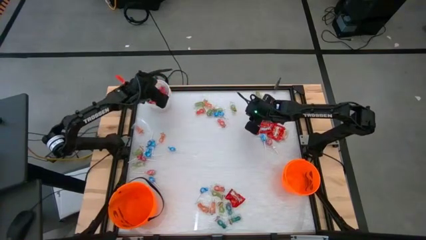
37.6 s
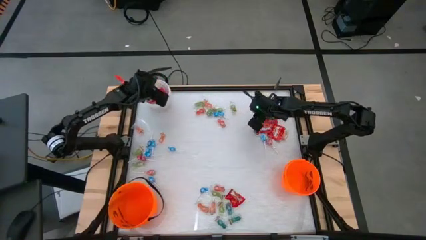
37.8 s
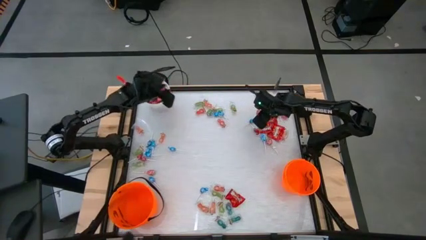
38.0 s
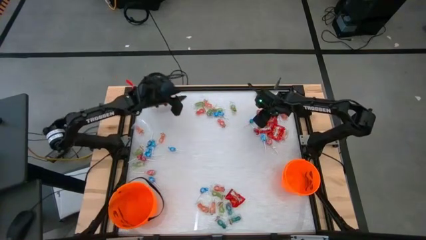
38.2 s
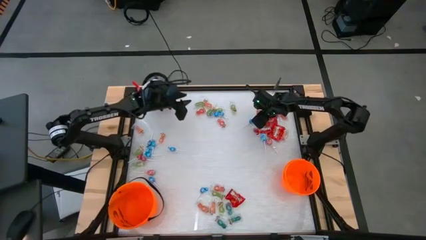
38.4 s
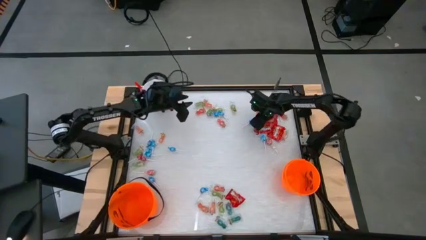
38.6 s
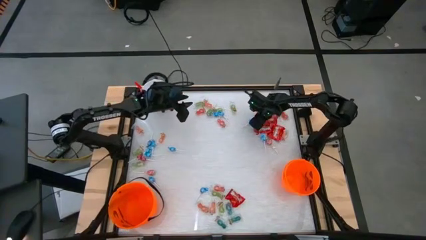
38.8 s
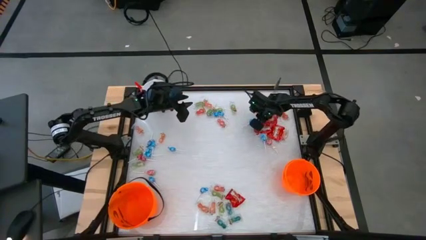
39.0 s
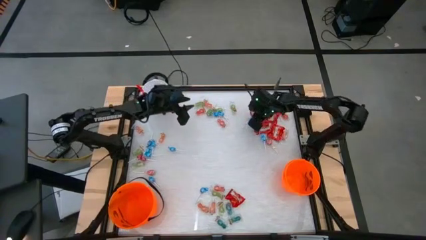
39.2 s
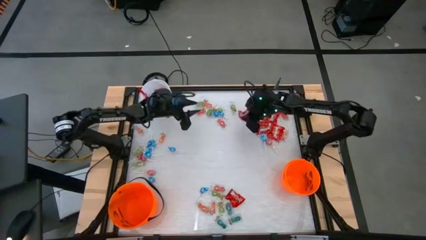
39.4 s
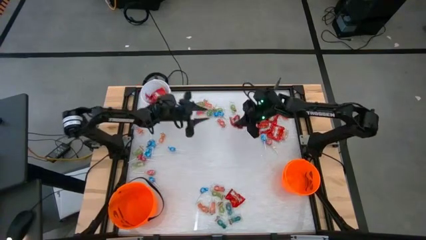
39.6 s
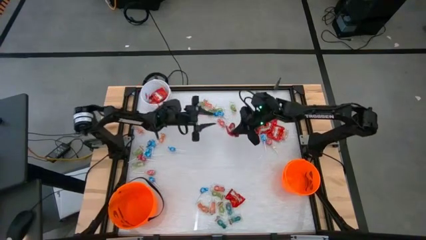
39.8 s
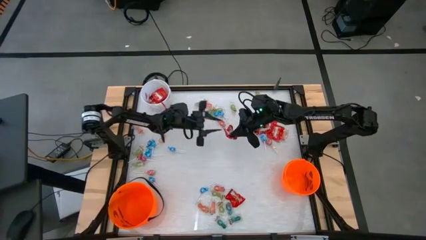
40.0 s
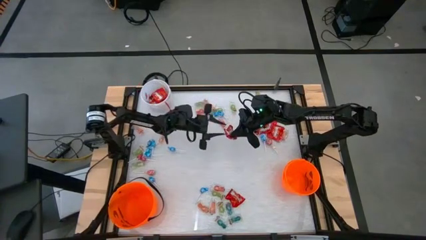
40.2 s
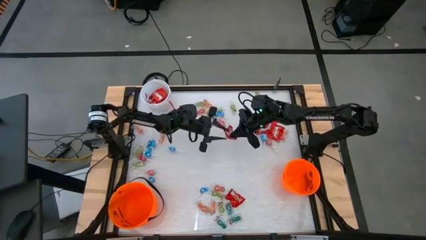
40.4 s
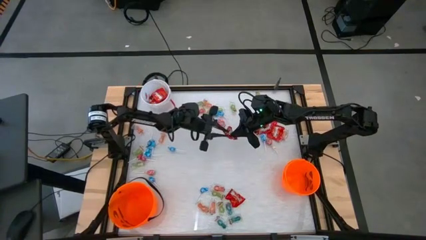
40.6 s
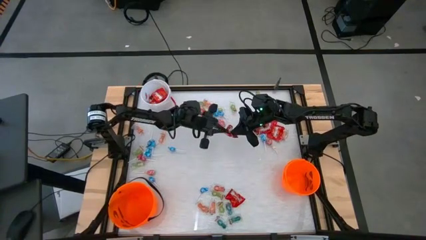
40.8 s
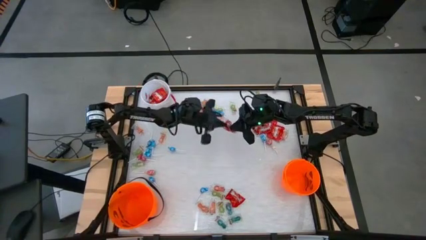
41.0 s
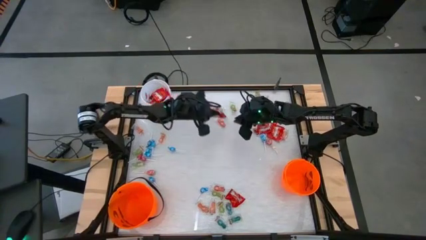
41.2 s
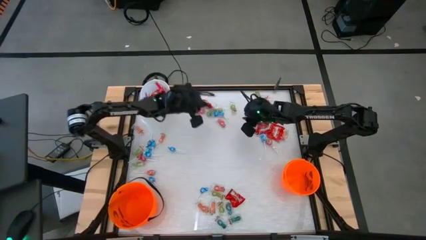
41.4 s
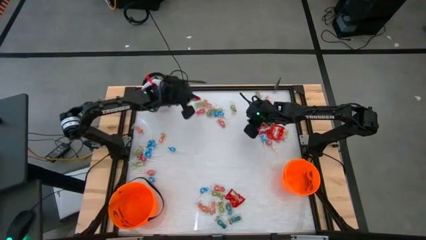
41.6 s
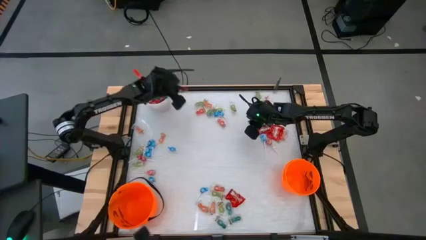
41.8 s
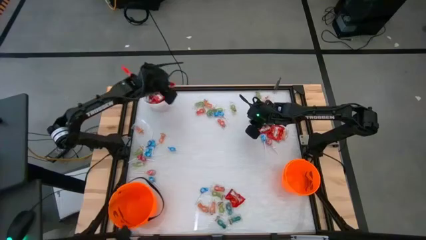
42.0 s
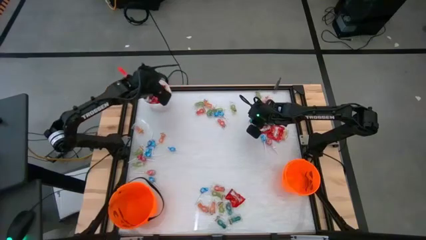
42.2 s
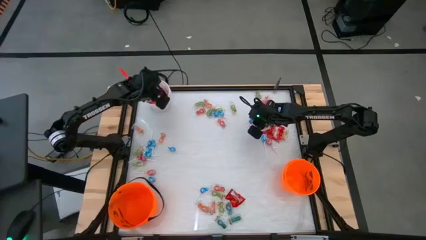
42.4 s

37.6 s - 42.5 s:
Task: Sort candy by brand, put in halloween buckets
Put the skittles into the white bucket

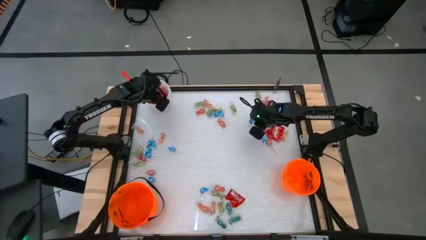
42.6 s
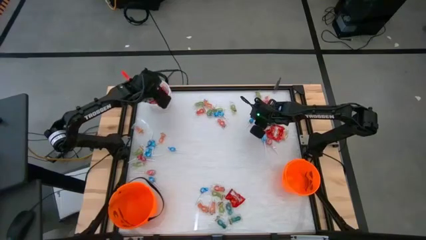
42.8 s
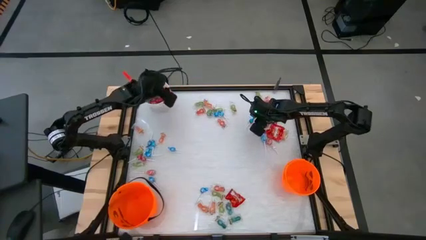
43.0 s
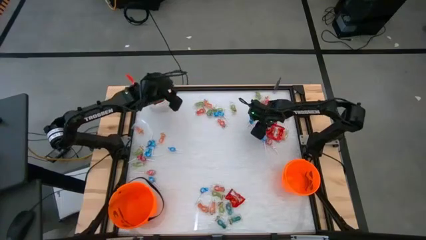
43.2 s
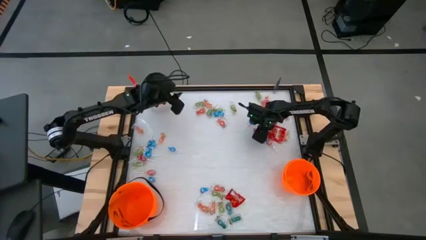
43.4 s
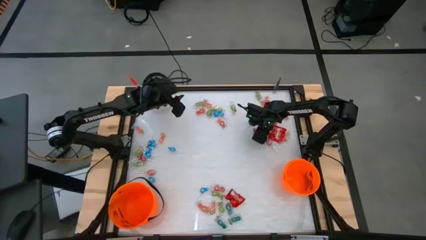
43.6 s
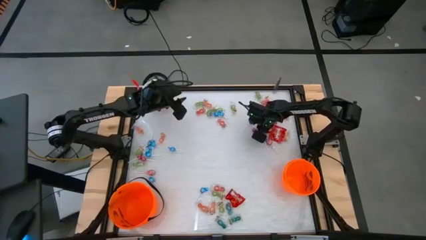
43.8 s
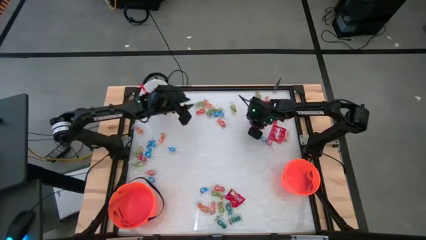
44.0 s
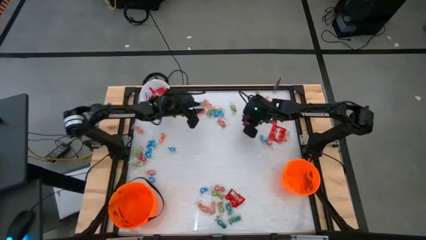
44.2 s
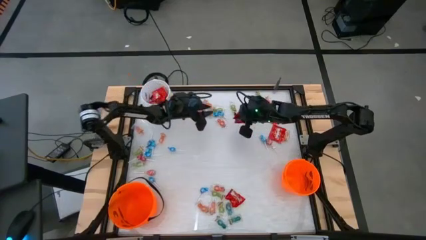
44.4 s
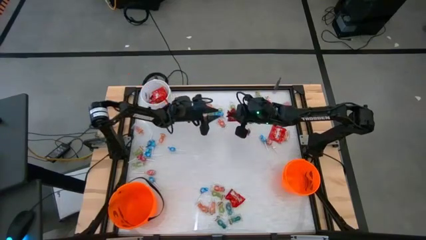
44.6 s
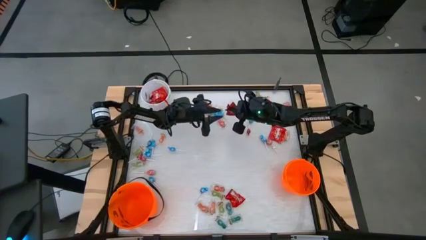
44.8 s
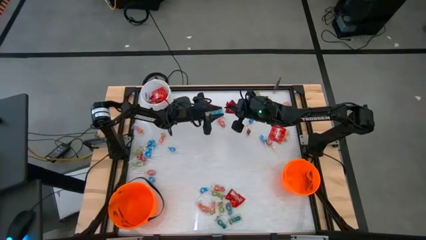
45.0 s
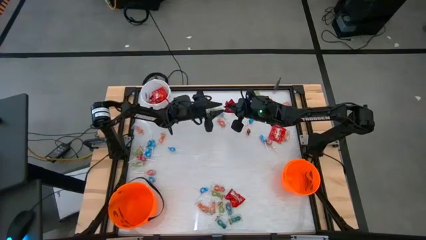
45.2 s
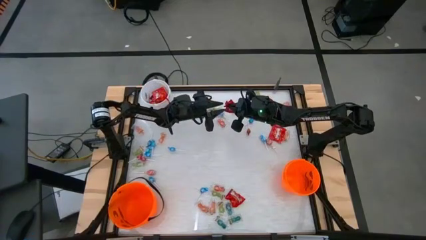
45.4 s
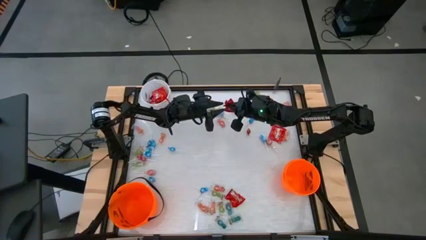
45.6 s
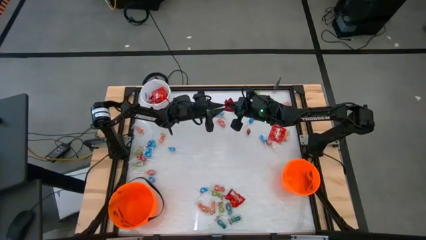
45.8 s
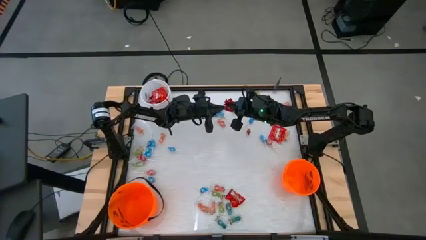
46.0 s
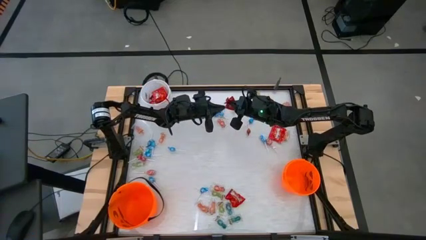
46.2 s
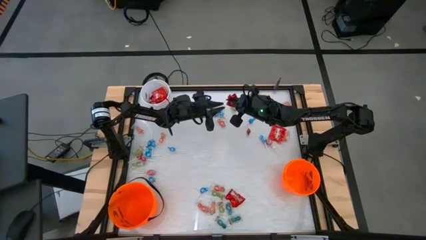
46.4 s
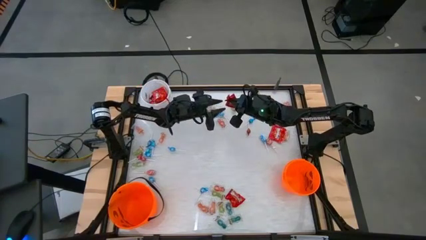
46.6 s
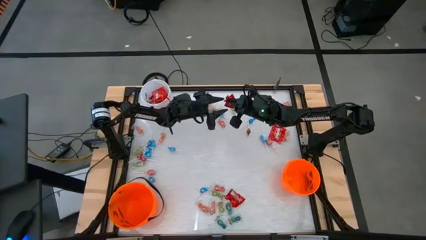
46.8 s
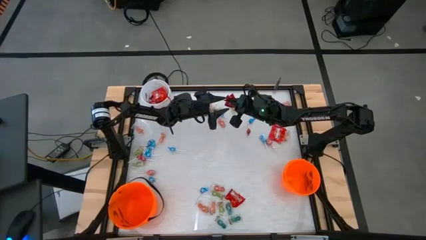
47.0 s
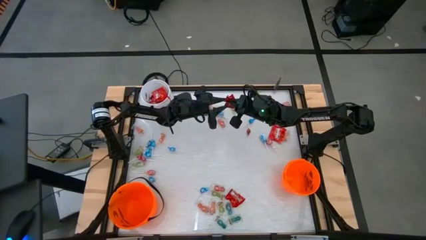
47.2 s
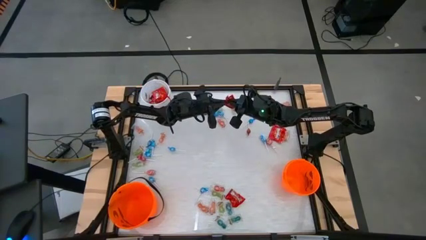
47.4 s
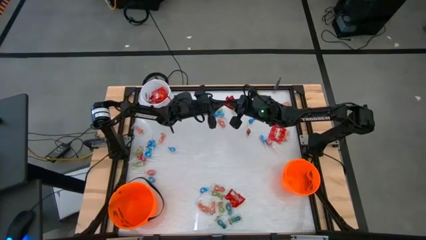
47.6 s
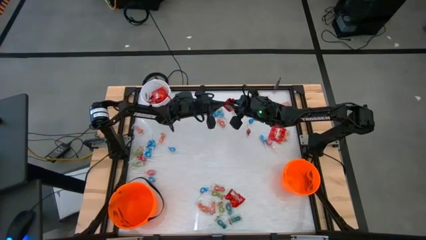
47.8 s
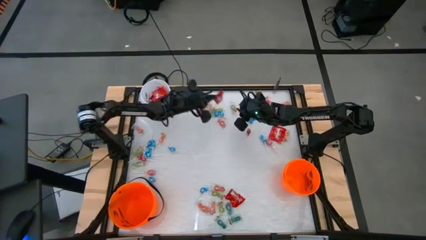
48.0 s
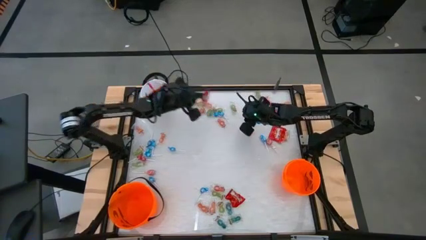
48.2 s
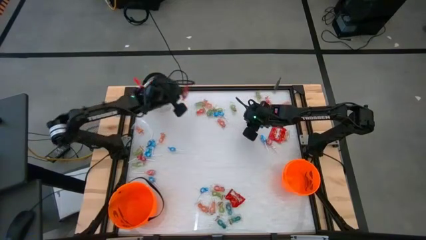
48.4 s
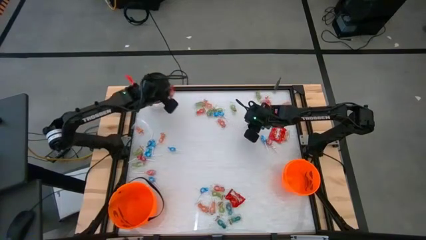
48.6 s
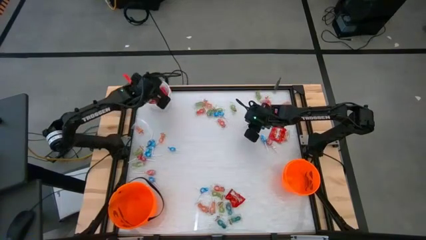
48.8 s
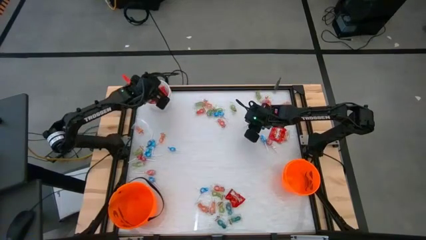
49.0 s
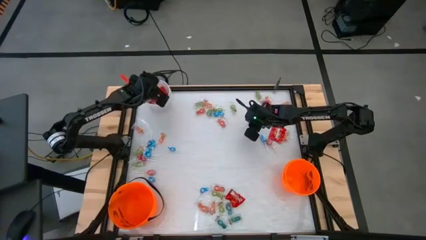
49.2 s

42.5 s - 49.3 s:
Put the skittles into the white bucket

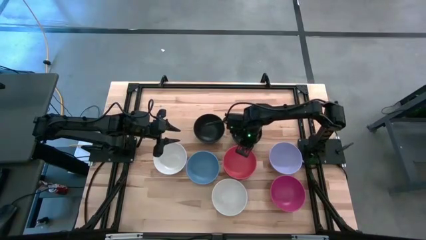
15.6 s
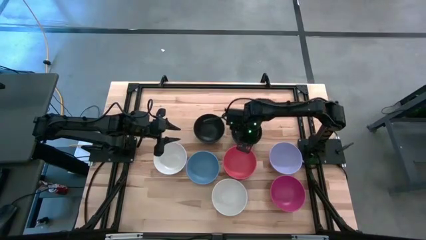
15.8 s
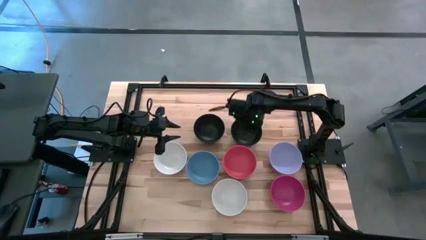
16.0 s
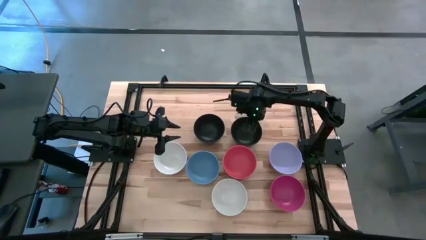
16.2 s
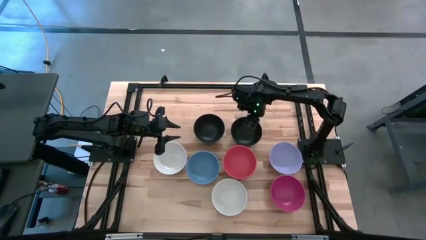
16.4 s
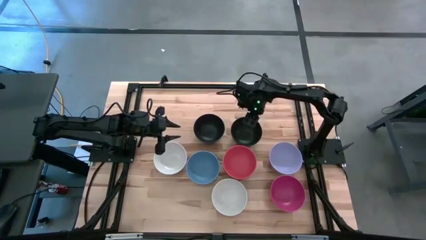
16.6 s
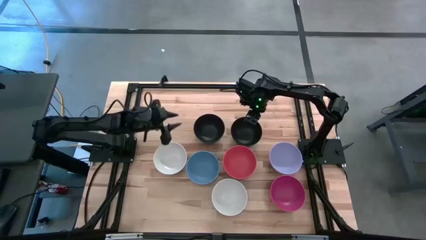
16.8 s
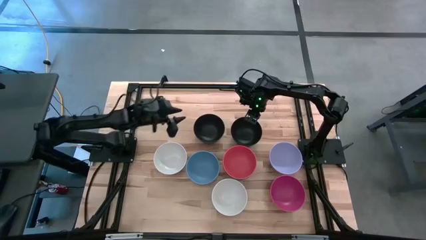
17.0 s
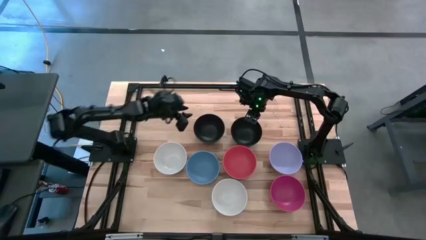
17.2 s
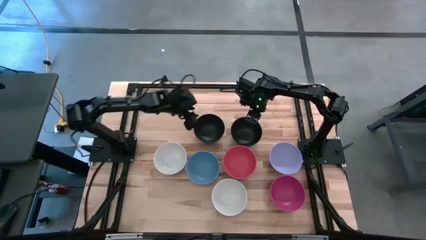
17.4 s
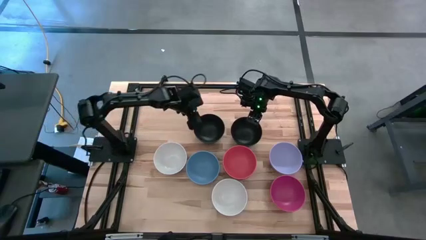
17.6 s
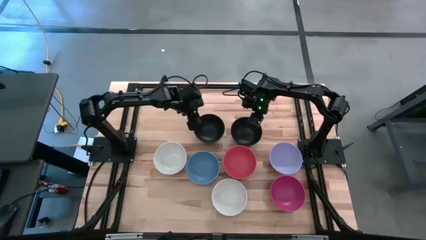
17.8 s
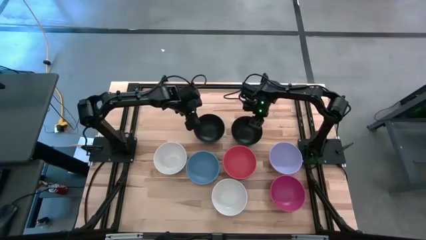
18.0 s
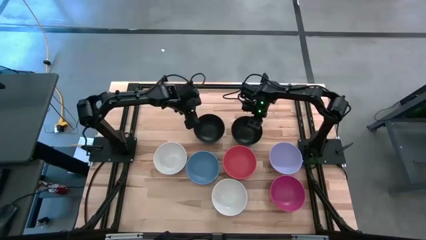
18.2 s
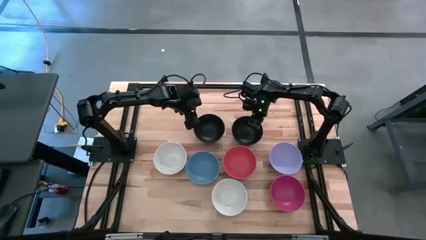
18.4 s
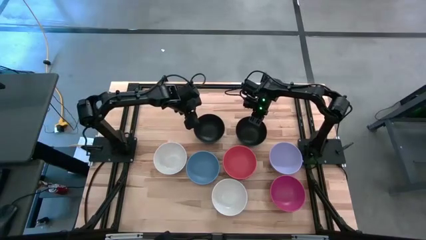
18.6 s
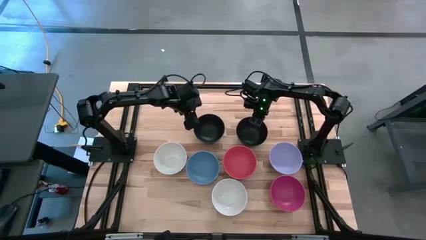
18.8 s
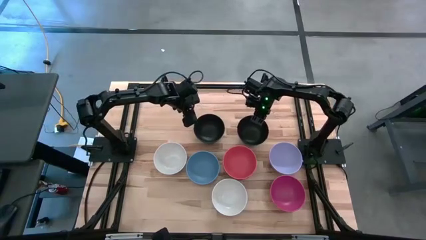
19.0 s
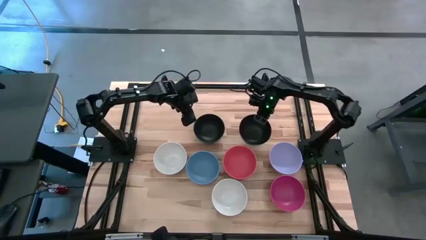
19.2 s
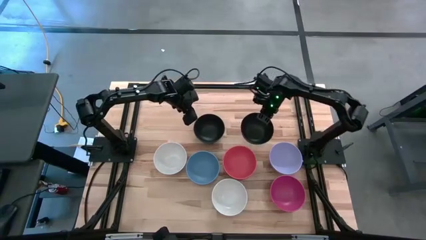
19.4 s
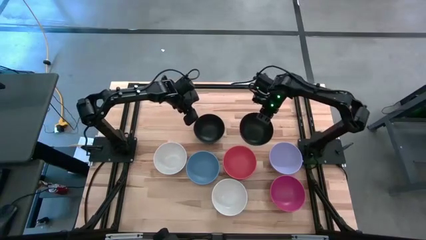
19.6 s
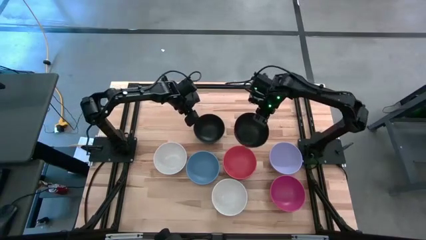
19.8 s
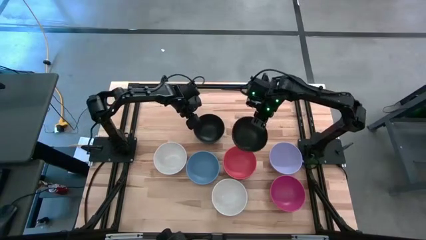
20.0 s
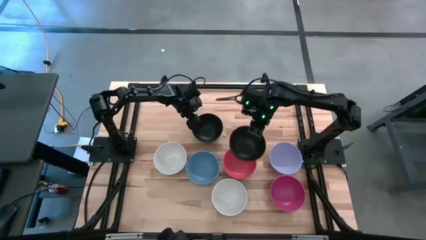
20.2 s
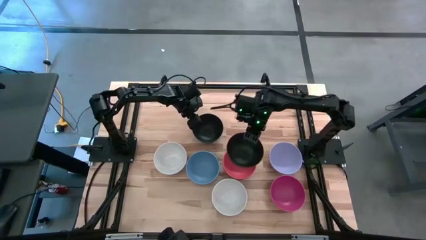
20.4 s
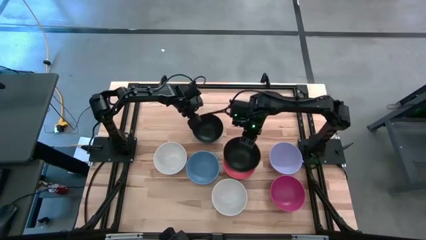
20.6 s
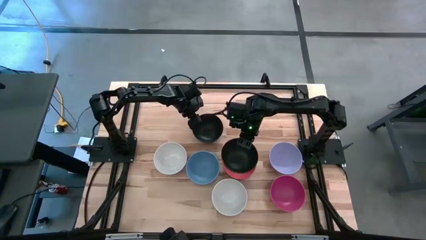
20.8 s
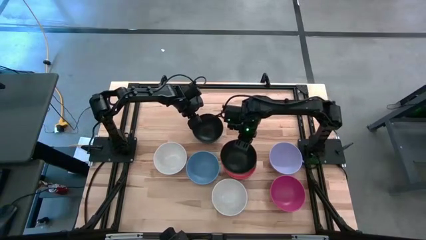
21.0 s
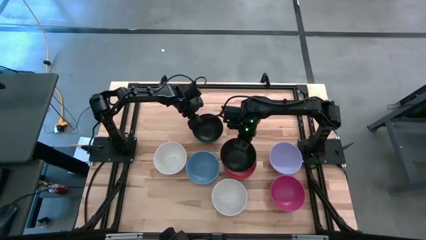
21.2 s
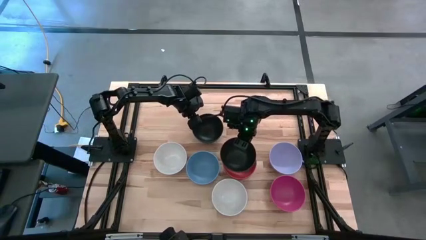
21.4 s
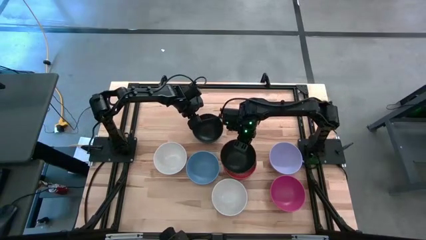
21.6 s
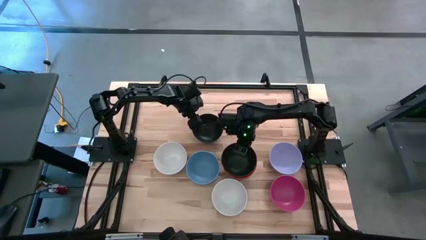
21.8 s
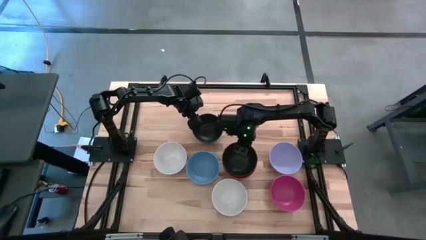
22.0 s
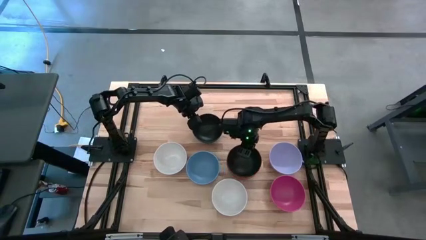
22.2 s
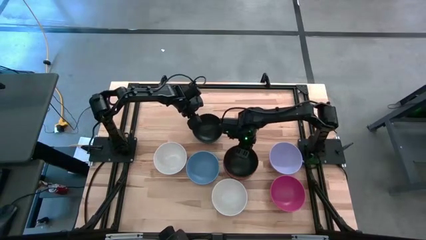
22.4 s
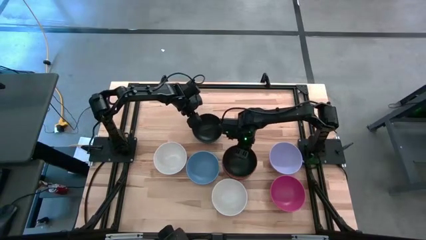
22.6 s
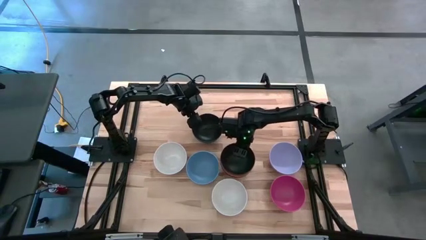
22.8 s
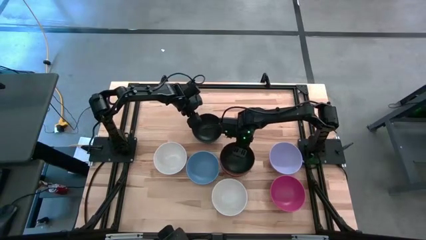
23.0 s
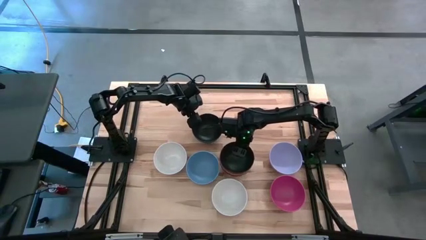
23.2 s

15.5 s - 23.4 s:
Task: Nest bowls inside each other
Stack the right black bowl on the orange bowl
